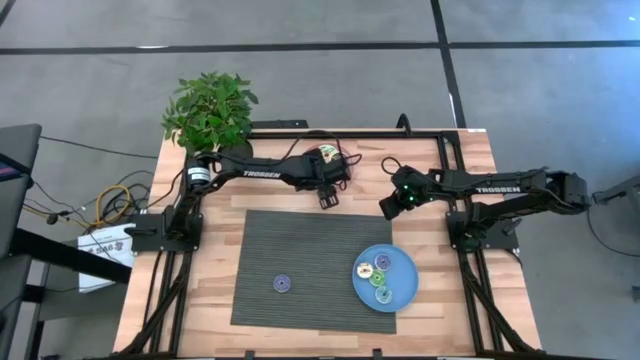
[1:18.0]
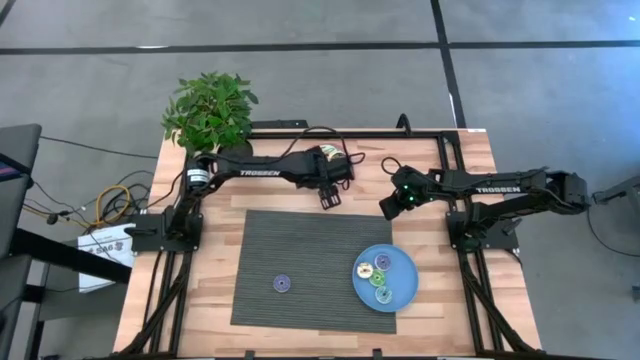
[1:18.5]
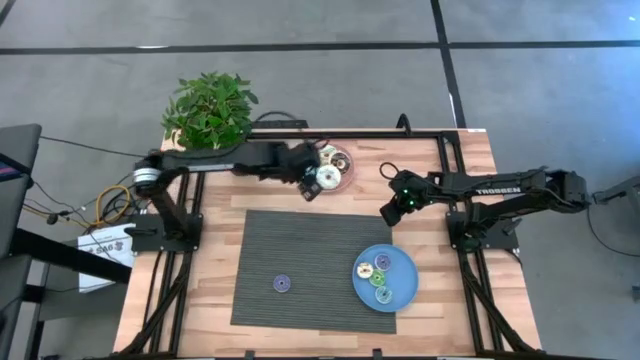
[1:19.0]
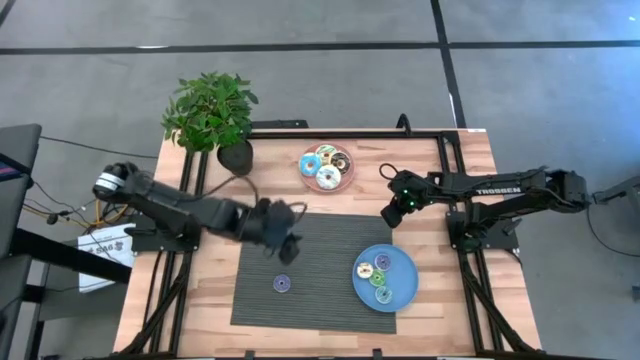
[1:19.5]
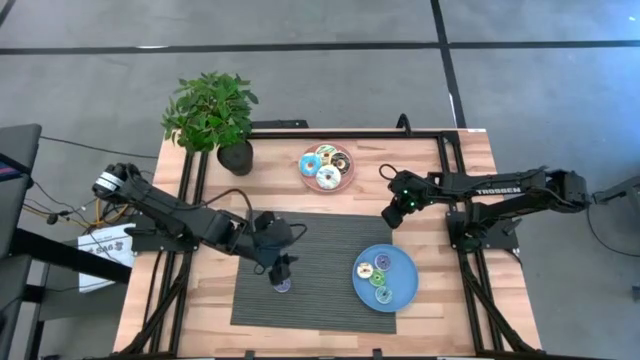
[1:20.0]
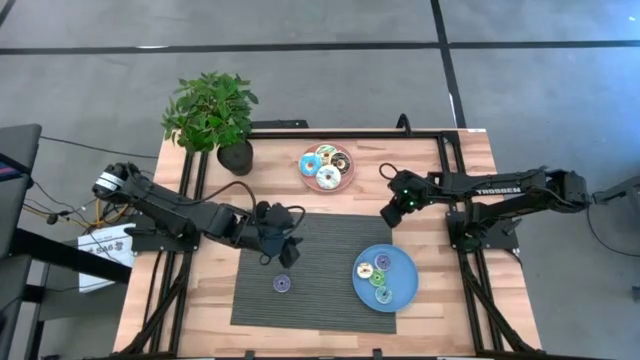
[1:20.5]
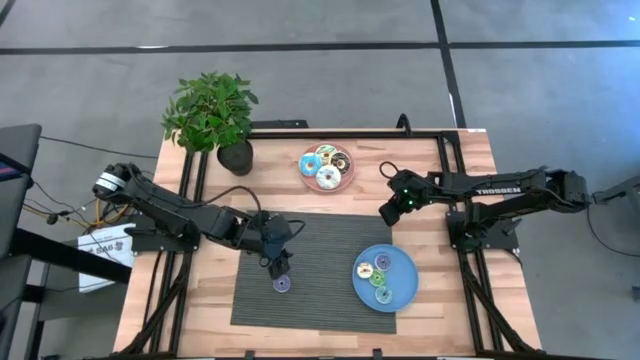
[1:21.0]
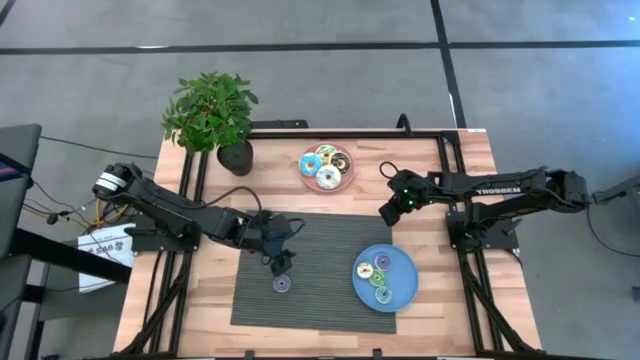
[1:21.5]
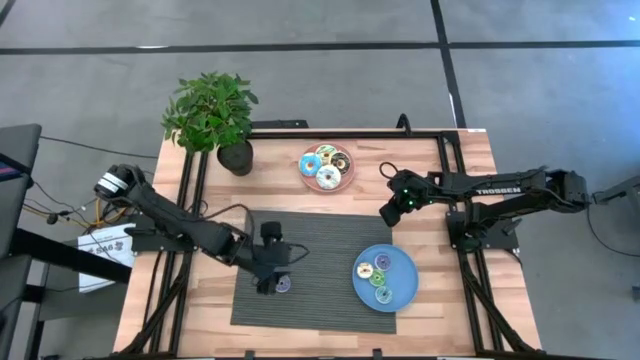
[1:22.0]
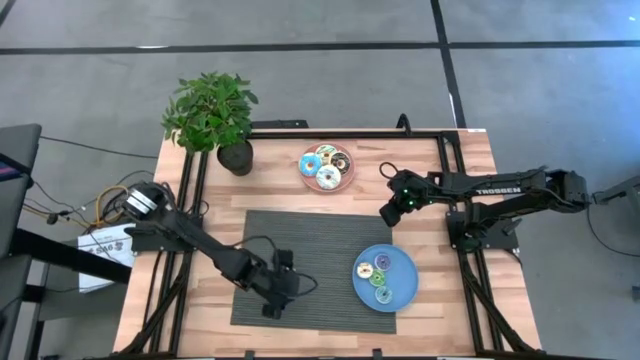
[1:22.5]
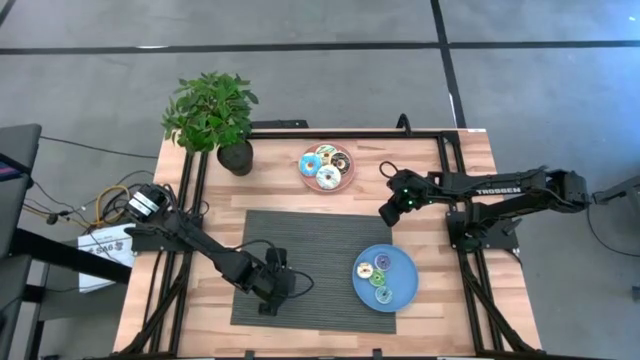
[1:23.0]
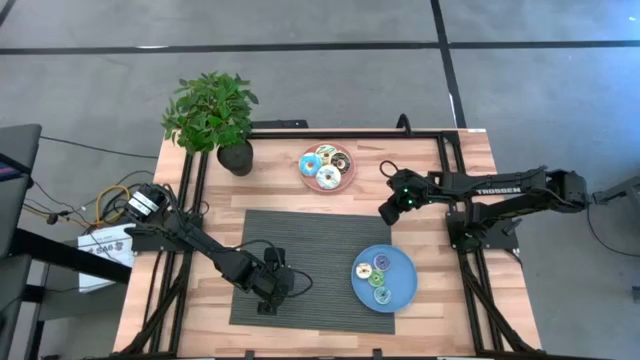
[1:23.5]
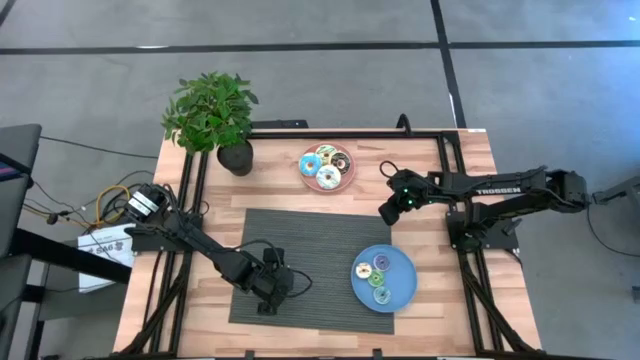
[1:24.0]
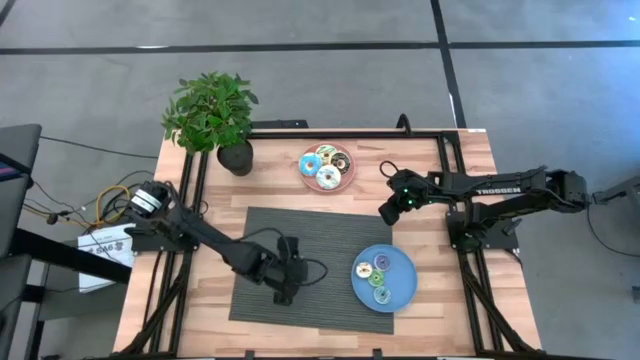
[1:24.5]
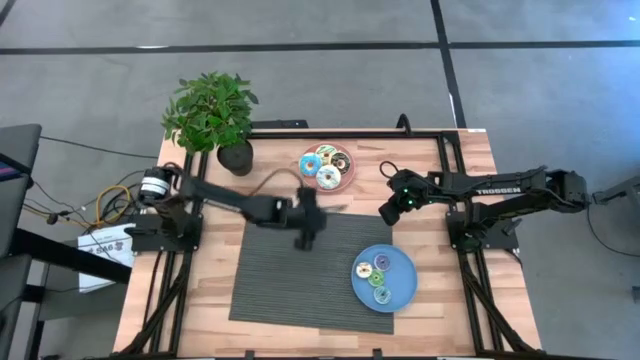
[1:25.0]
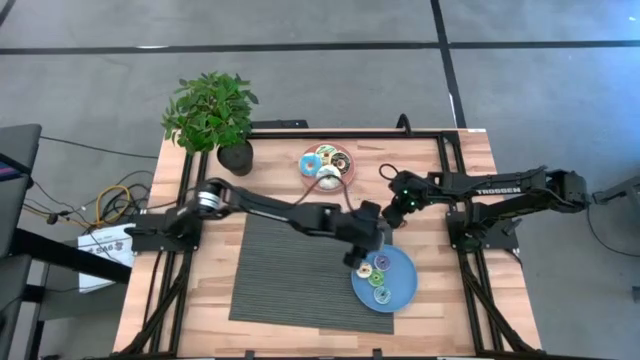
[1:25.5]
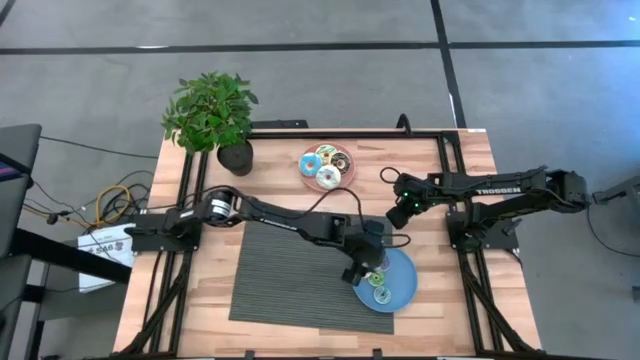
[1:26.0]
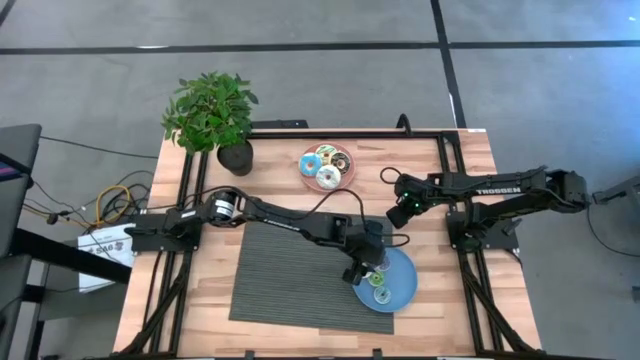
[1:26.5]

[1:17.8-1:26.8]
Task: Pick & Place donuts
Put the small dark blue donut on the blue plate

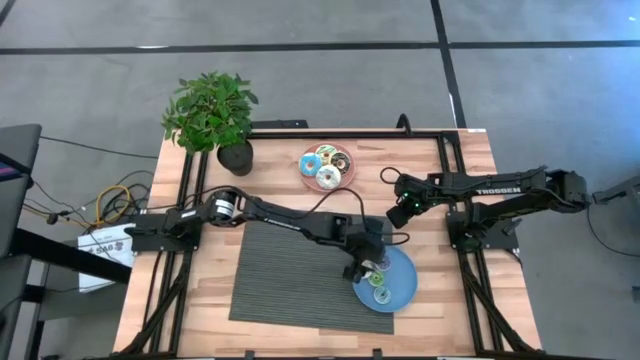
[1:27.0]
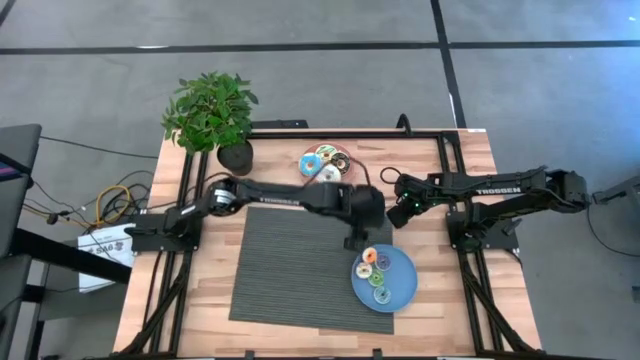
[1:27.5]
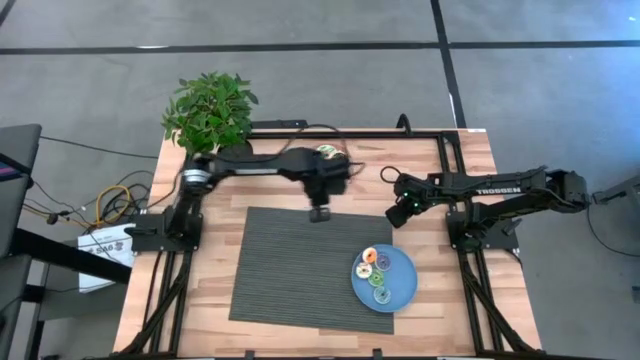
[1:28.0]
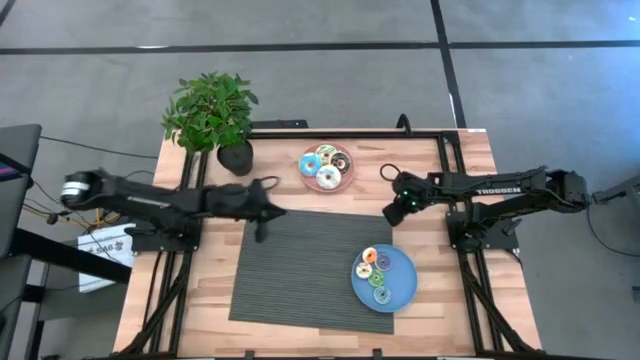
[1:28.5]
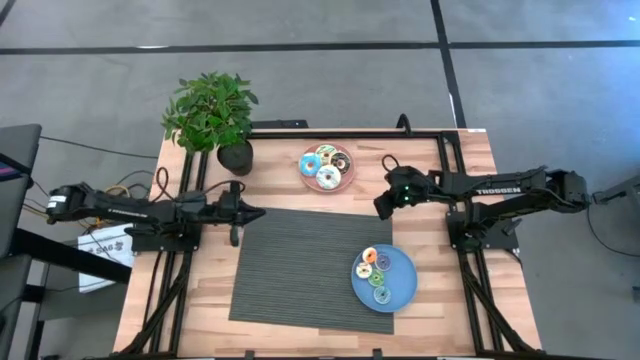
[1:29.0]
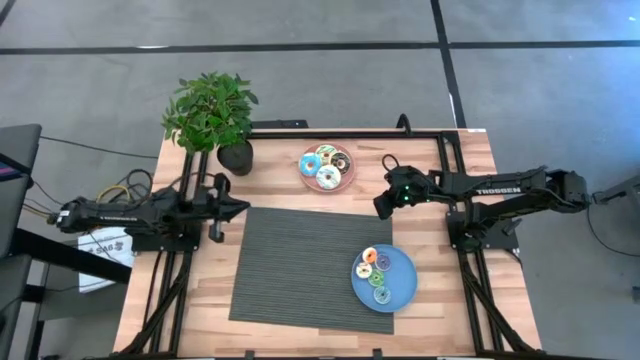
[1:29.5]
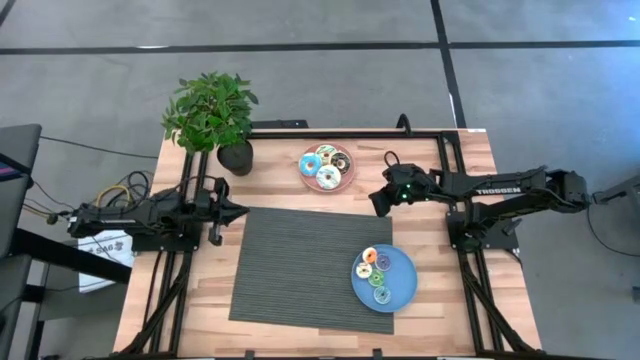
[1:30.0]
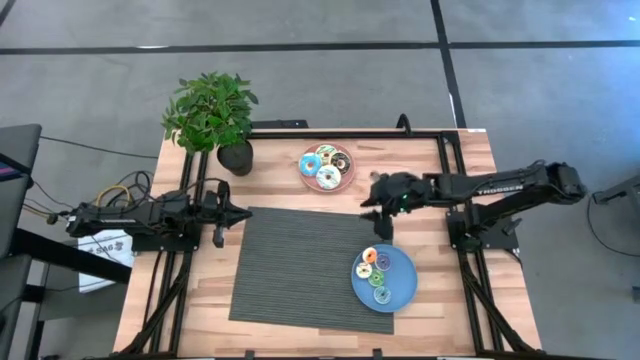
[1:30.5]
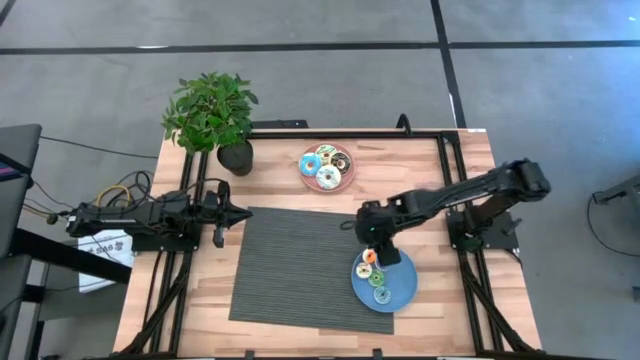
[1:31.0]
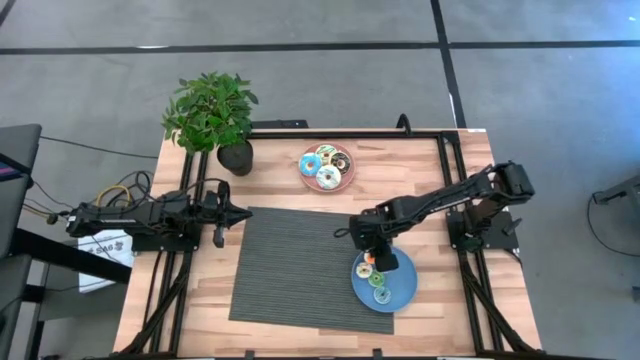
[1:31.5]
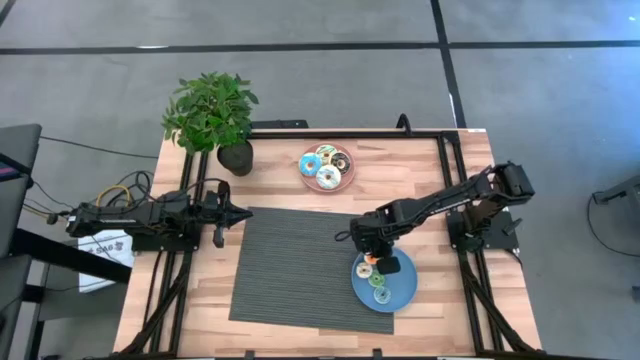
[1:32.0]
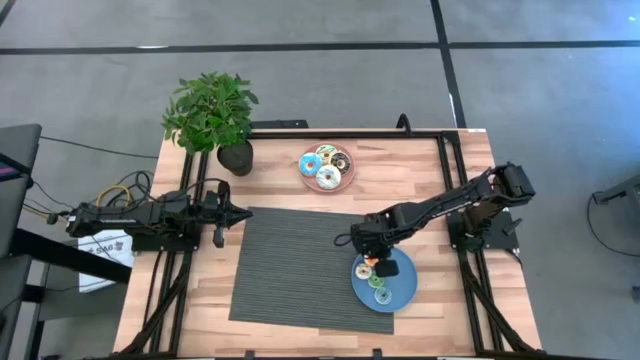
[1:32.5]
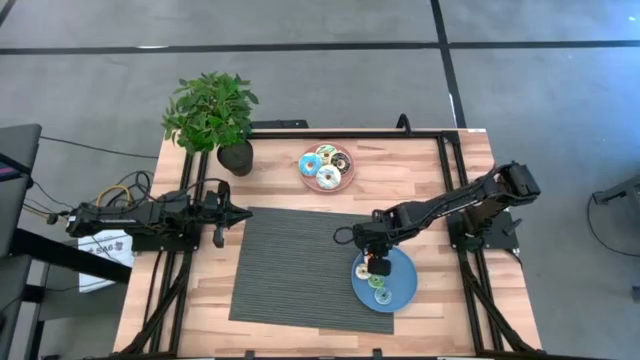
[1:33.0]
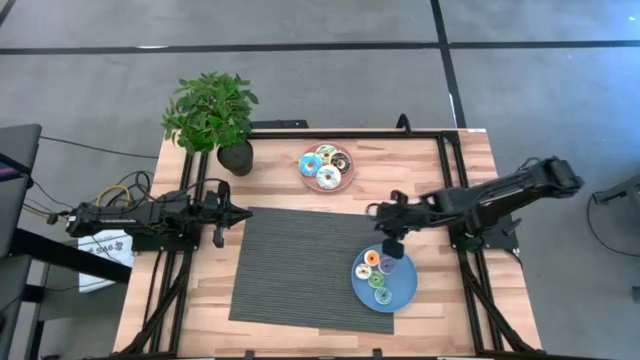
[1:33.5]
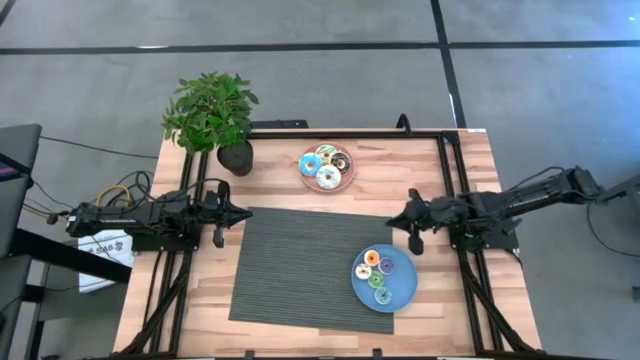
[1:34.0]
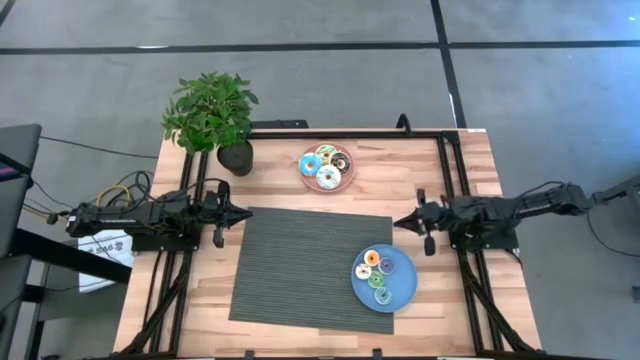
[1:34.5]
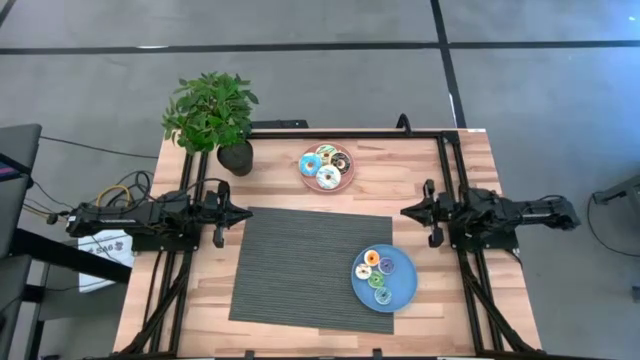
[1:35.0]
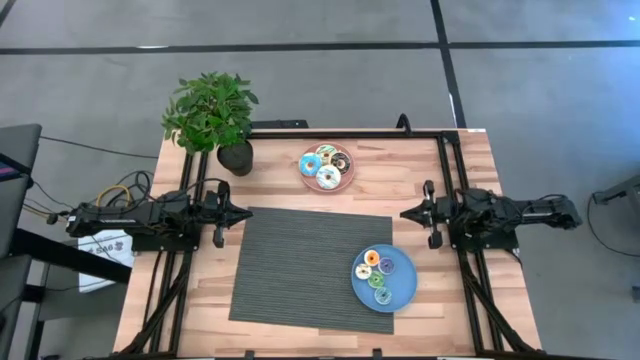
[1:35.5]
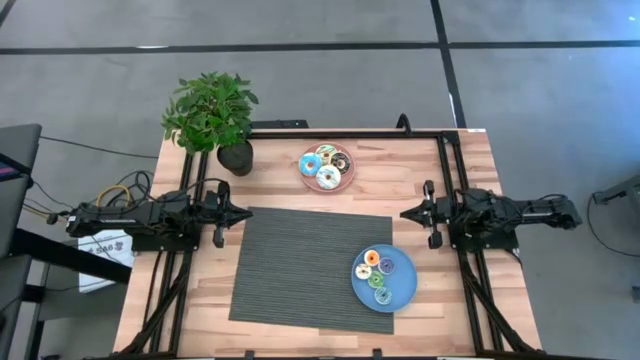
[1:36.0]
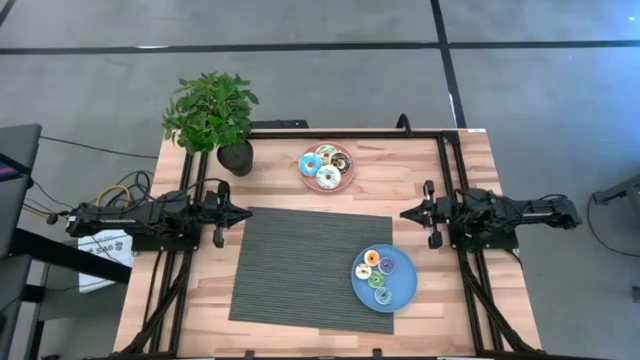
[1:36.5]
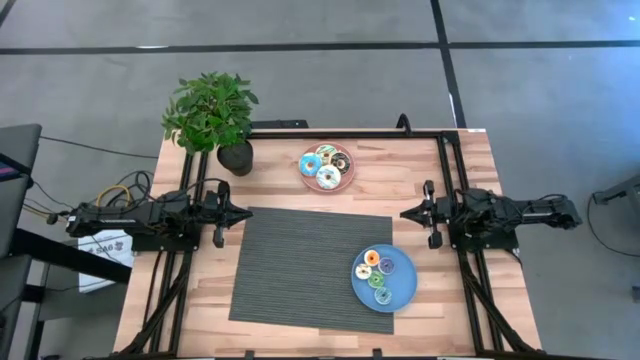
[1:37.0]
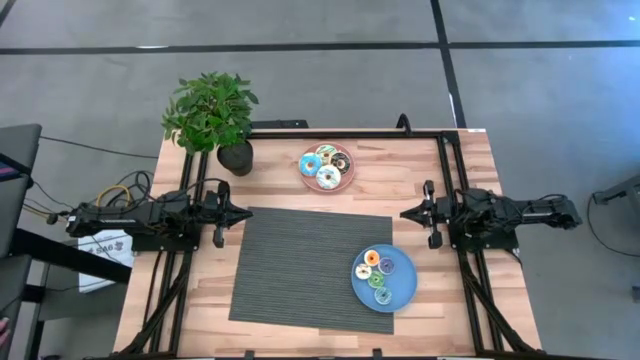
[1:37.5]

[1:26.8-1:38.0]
Return to Home Position

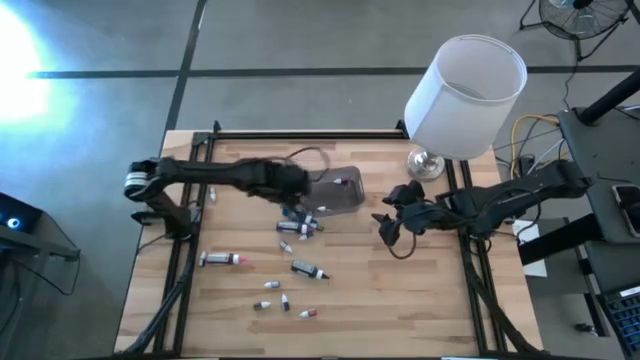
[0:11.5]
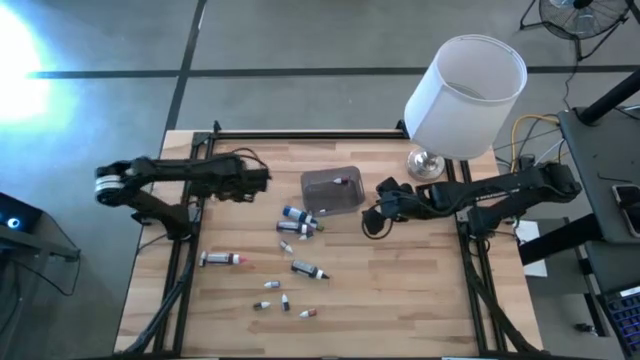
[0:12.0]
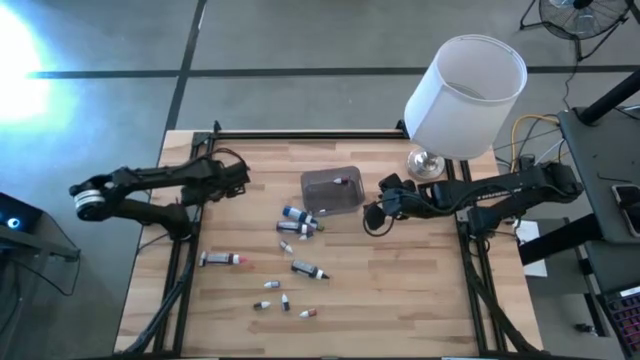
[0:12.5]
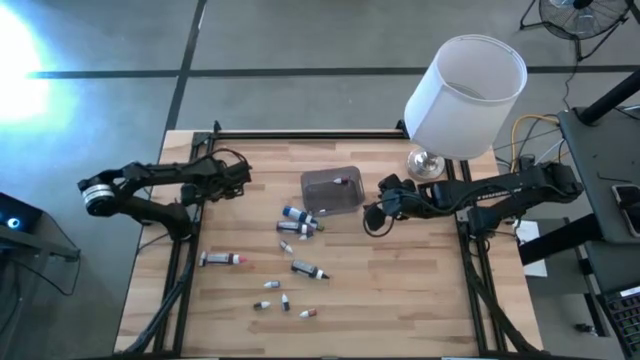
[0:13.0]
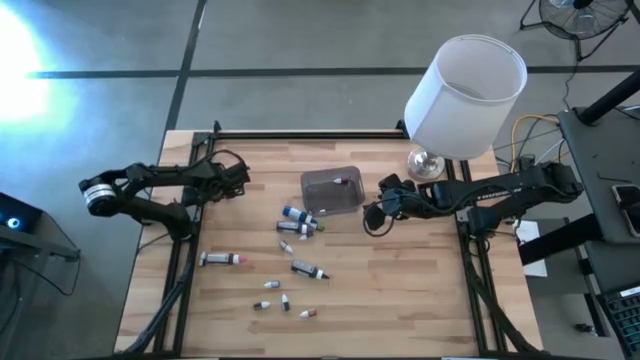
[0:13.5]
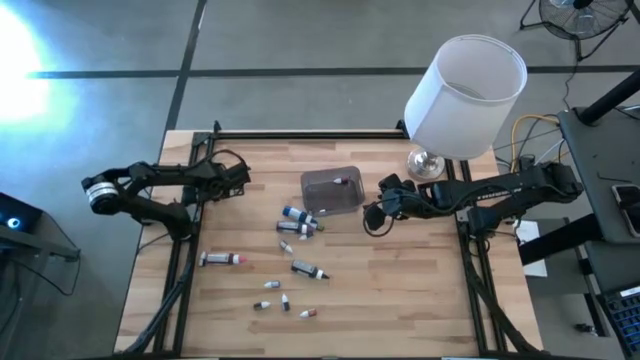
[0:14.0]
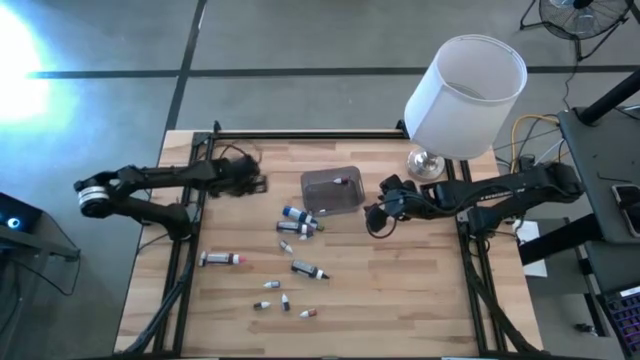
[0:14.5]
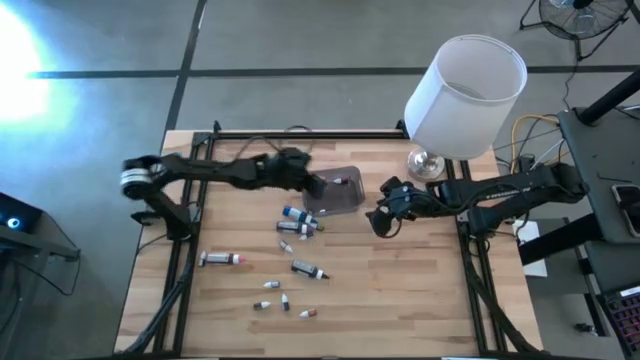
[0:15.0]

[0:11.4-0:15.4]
Task: Pick & Place food coloring
Put the small black food coloring bottle into the bin
